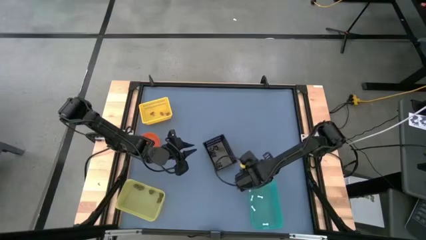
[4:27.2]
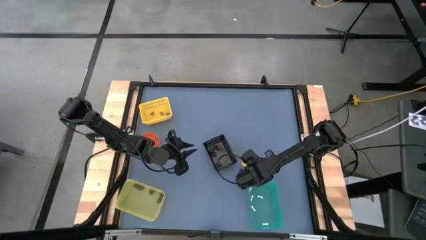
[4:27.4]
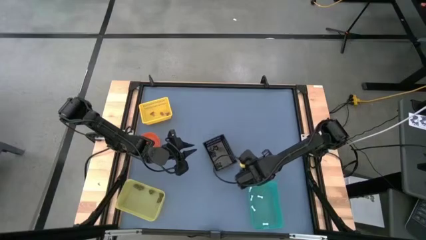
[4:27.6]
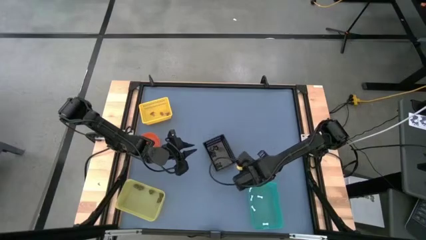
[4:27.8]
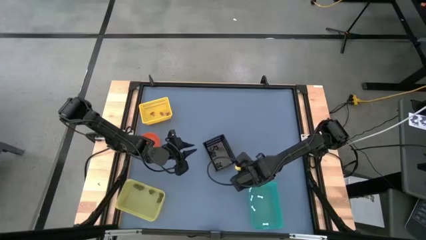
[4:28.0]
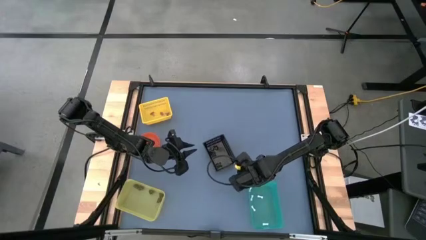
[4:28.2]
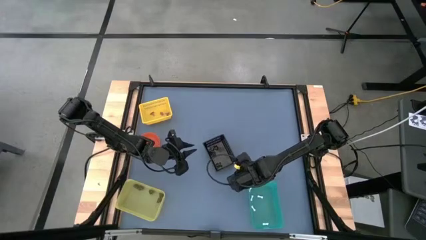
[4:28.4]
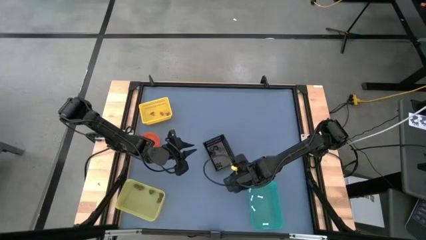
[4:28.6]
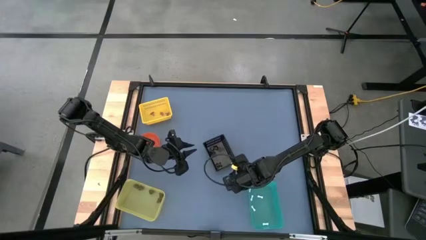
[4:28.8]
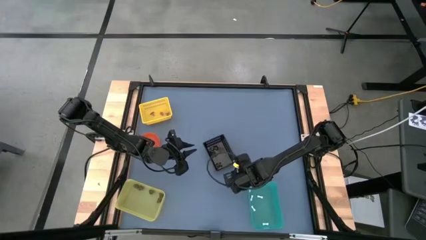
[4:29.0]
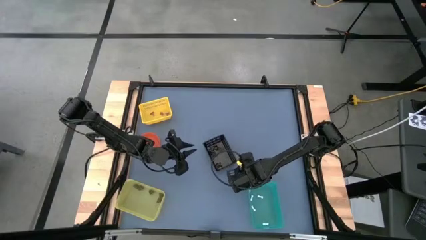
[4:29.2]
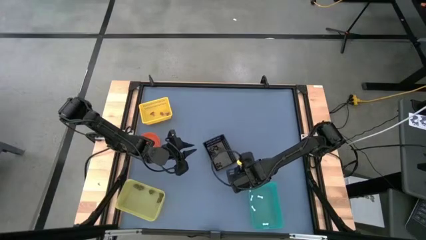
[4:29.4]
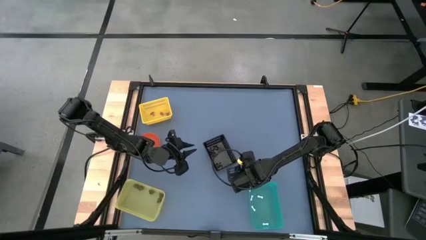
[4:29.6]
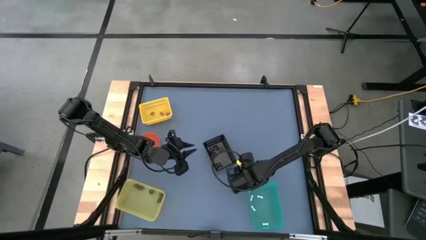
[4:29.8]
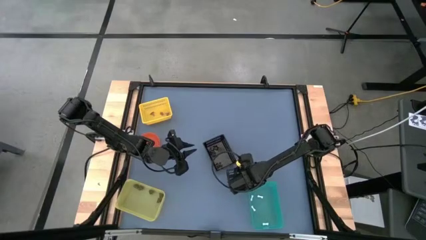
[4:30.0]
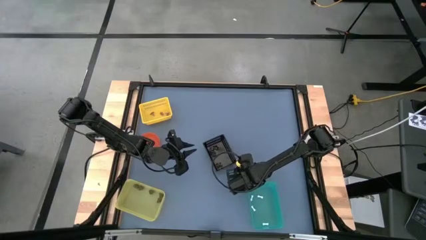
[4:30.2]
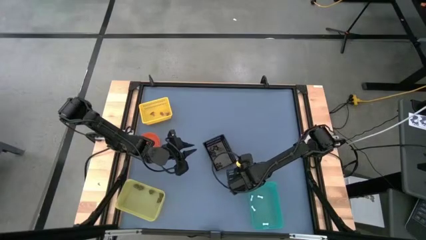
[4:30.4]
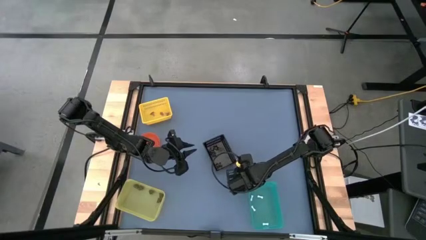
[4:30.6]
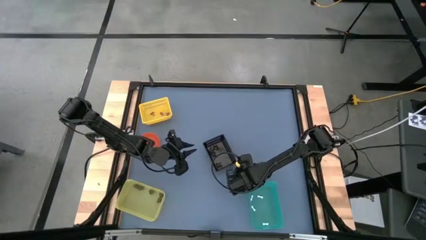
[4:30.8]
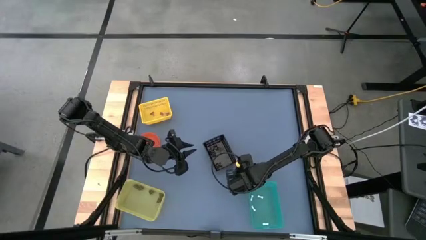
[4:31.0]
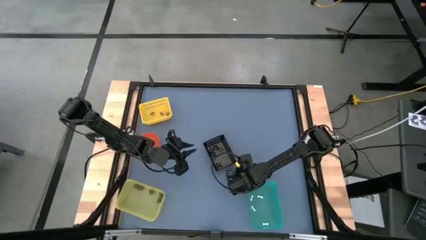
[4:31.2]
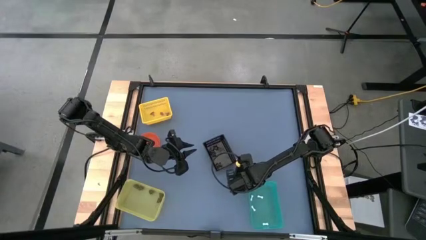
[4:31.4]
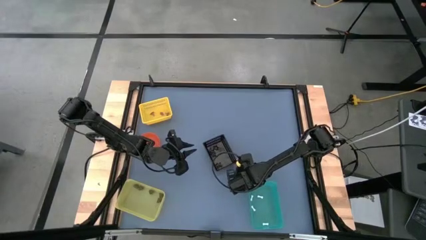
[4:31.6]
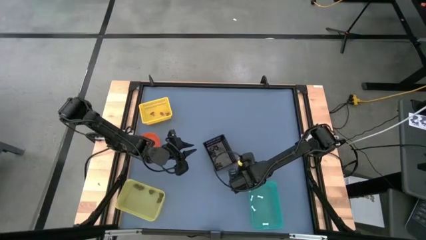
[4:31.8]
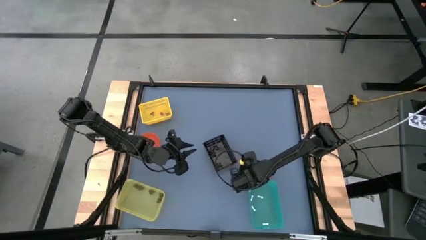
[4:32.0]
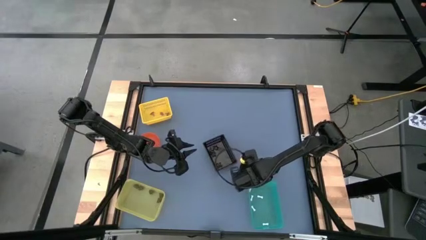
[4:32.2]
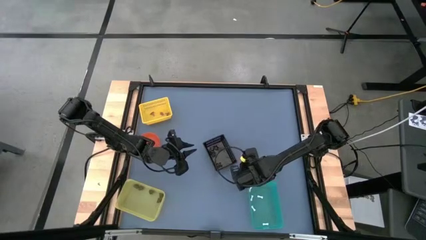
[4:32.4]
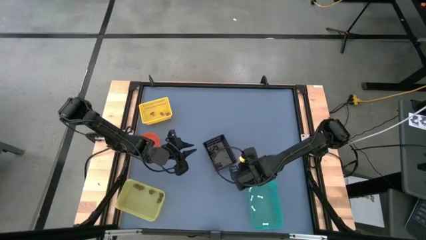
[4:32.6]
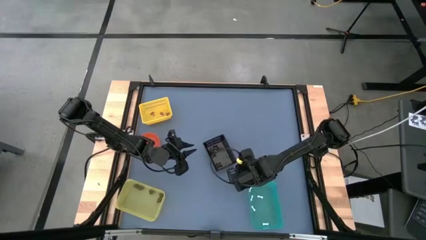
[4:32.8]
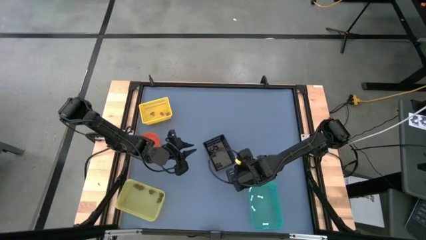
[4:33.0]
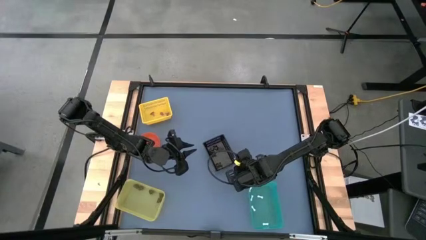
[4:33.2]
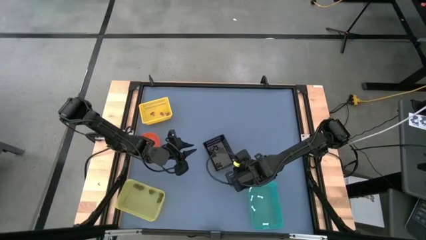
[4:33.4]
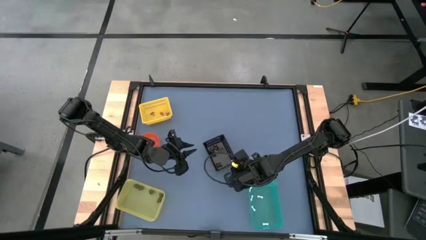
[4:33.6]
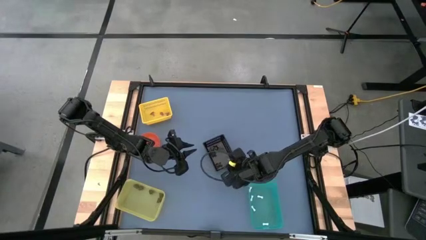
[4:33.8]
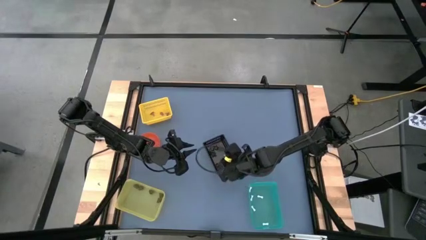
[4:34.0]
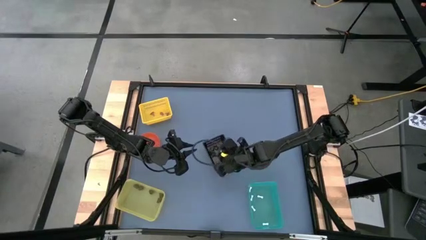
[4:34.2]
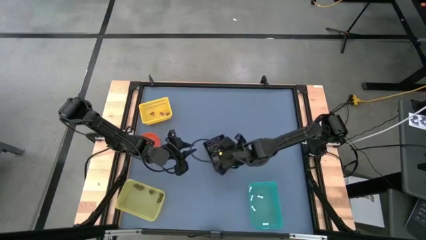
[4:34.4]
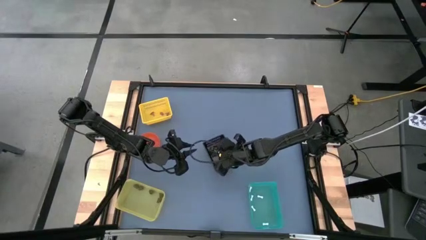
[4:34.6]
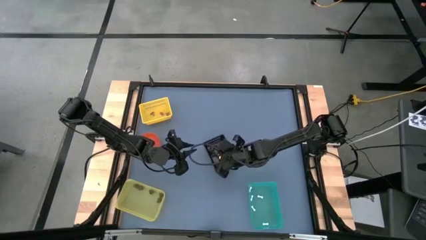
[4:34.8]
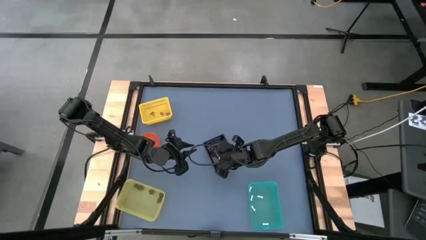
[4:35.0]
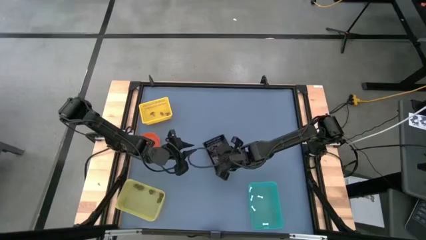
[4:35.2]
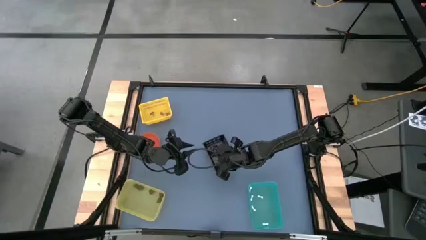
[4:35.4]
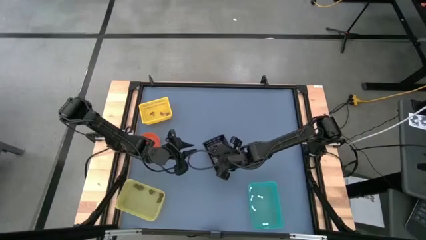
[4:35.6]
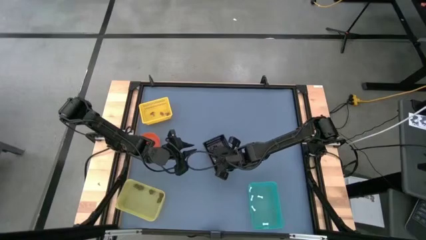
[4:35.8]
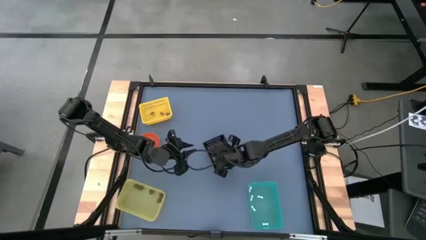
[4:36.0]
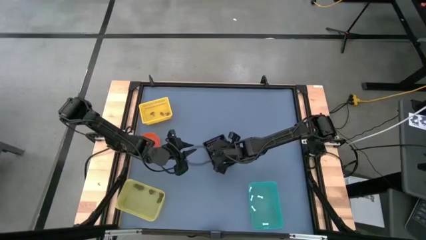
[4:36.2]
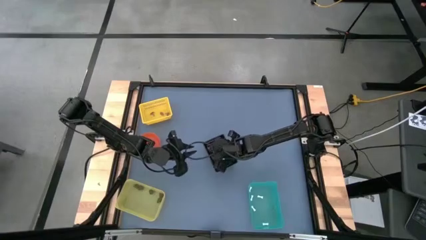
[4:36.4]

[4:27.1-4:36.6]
Task: Sort Halloween decoration
Put the black spider toy into the black bin

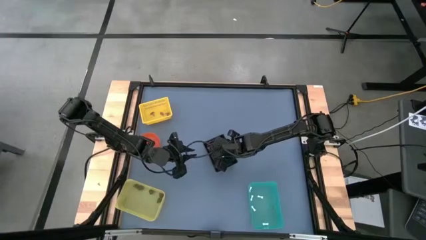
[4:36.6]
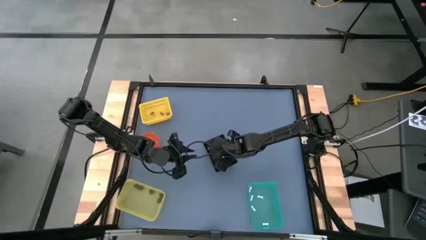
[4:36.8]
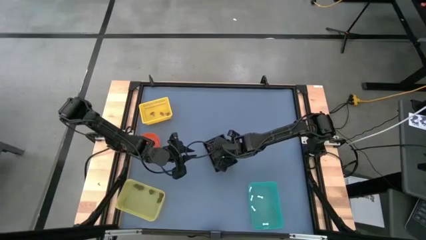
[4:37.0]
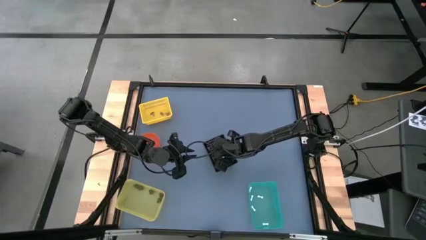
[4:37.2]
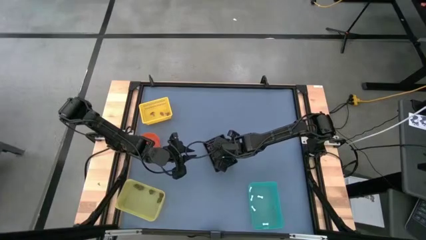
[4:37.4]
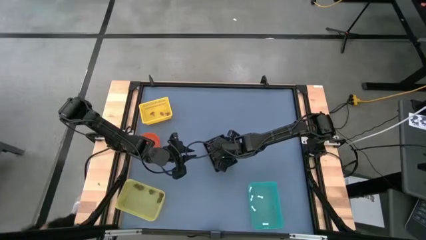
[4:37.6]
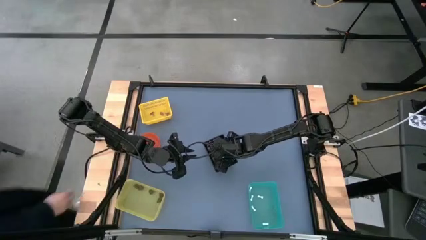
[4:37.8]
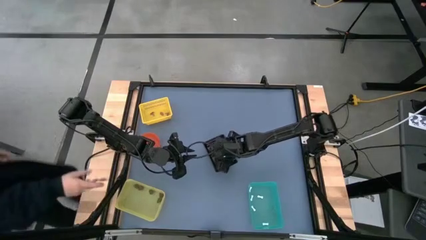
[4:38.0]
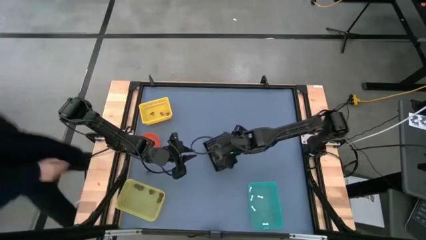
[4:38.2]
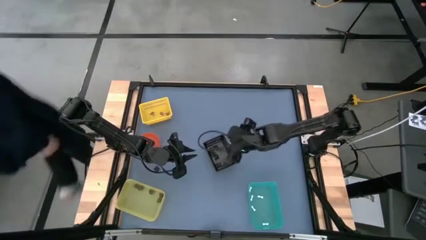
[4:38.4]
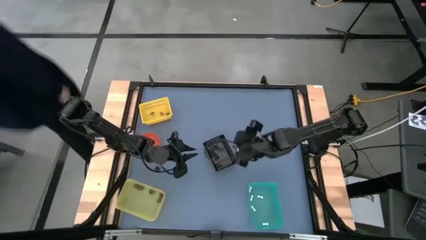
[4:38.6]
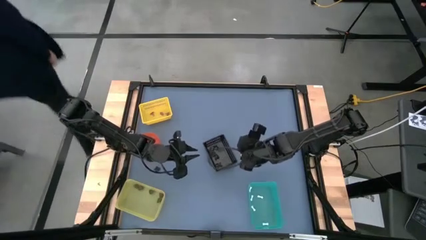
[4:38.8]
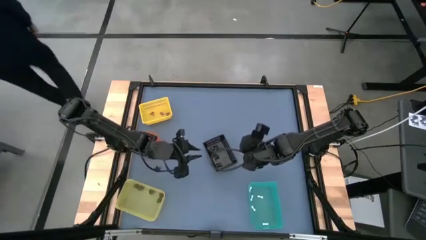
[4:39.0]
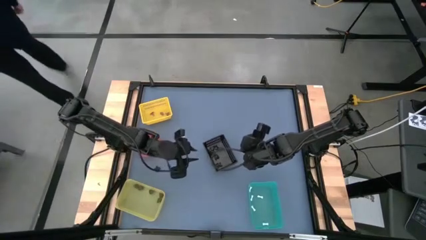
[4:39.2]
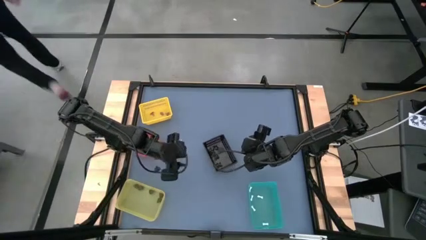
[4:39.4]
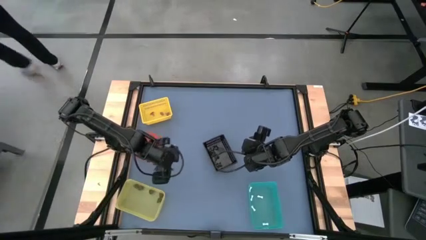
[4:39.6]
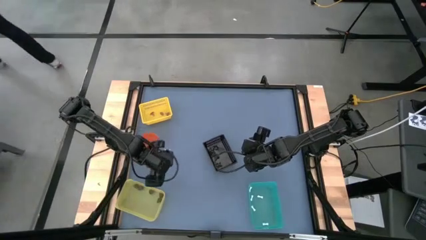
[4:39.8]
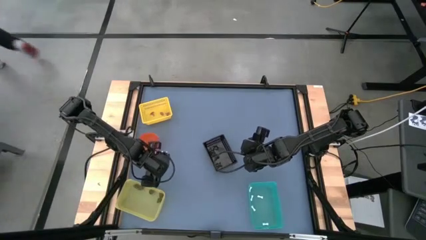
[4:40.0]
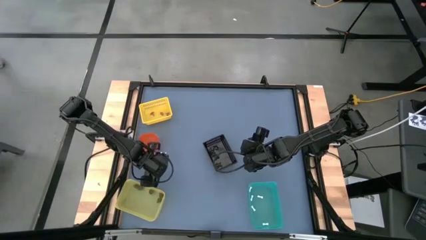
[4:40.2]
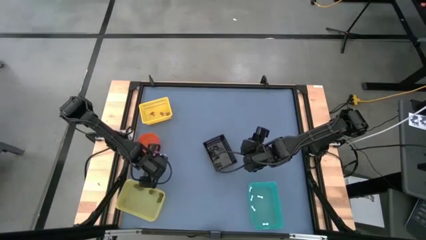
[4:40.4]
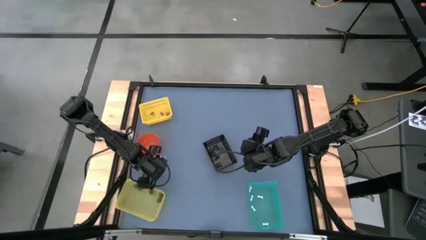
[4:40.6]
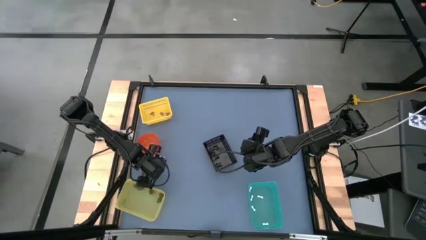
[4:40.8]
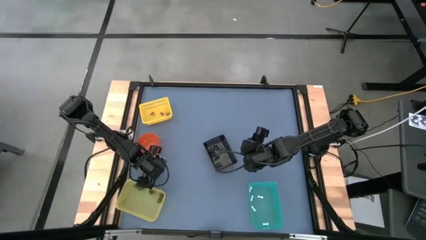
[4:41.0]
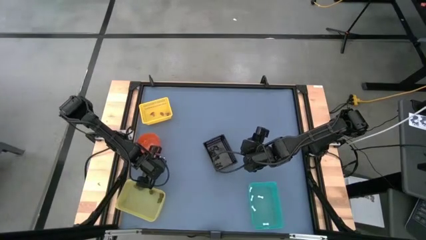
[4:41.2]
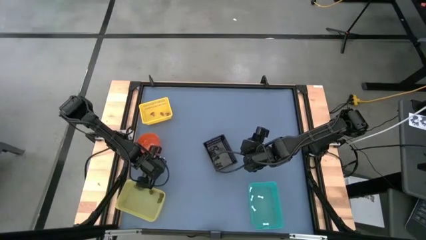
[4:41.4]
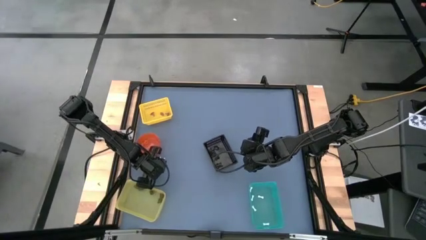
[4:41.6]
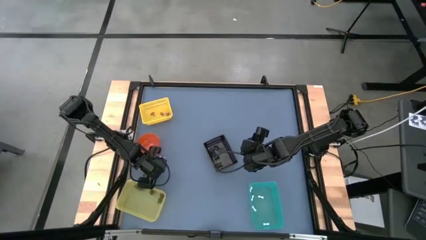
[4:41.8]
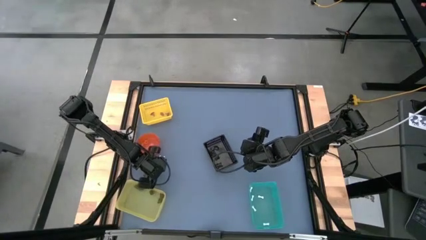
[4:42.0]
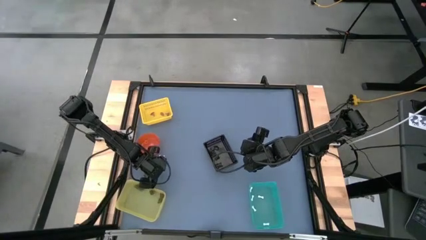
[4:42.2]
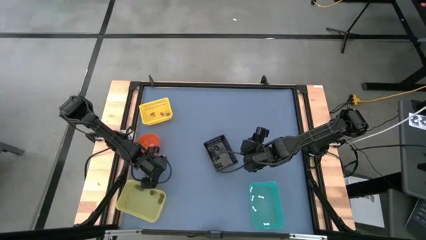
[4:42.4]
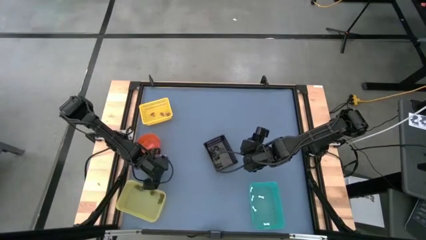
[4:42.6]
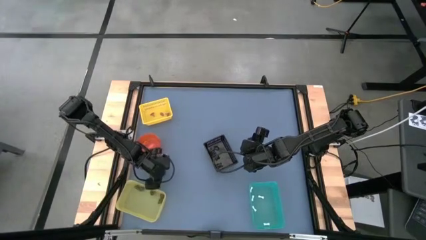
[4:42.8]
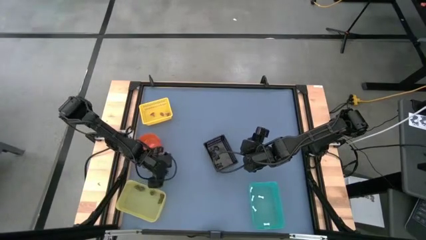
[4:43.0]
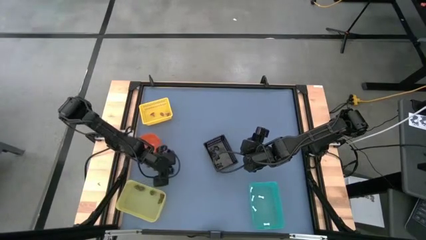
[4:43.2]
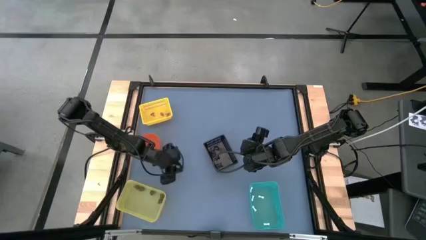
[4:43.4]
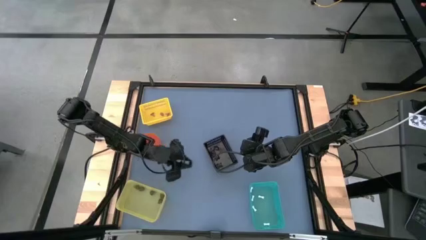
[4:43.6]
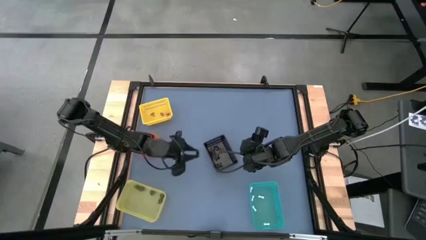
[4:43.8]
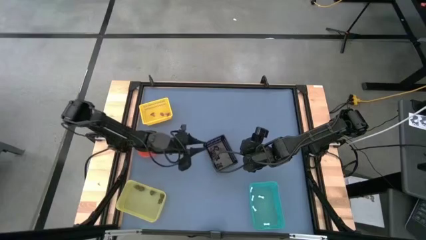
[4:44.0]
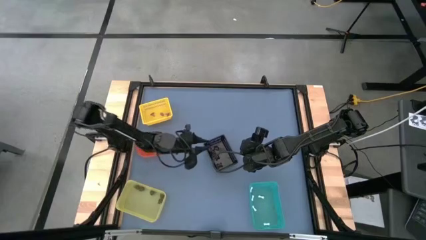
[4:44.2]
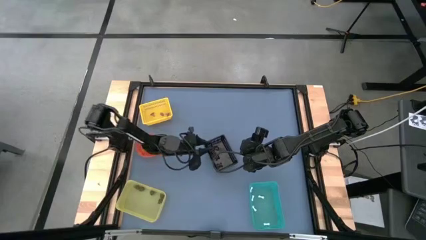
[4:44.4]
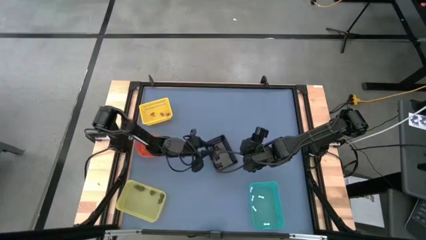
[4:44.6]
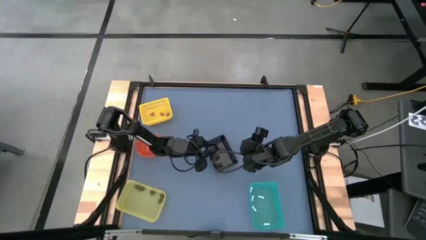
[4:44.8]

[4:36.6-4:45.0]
Put the black spider toy into the black bin
